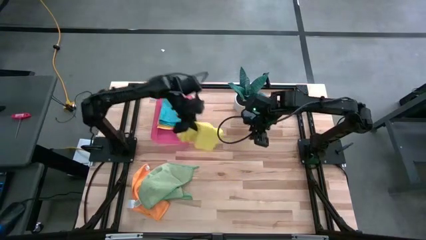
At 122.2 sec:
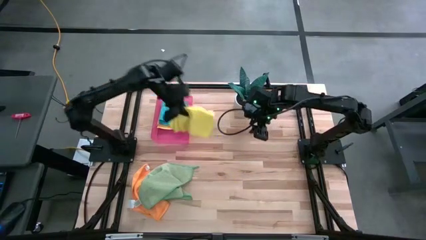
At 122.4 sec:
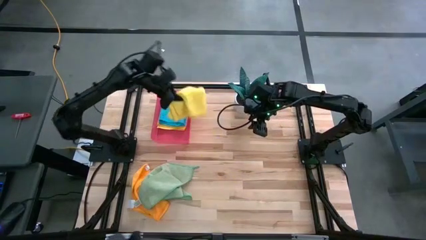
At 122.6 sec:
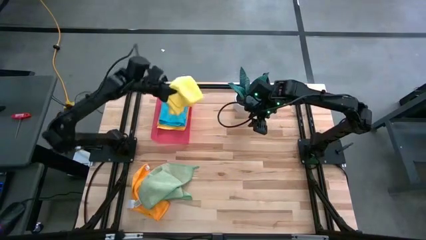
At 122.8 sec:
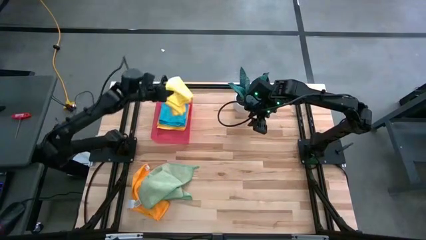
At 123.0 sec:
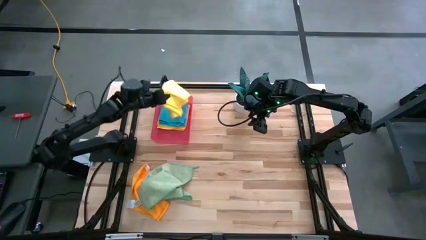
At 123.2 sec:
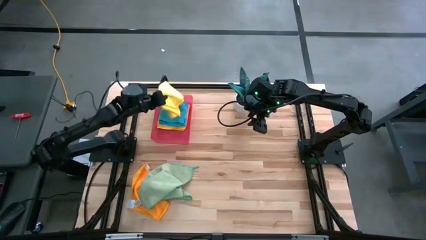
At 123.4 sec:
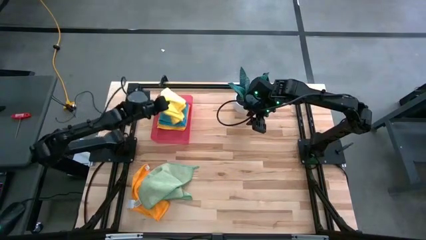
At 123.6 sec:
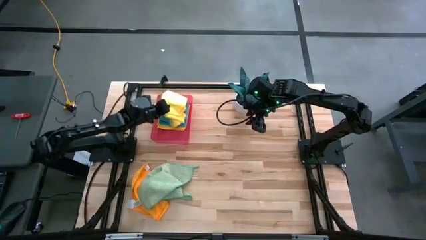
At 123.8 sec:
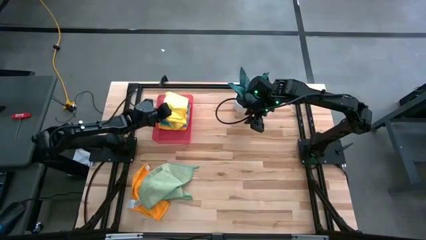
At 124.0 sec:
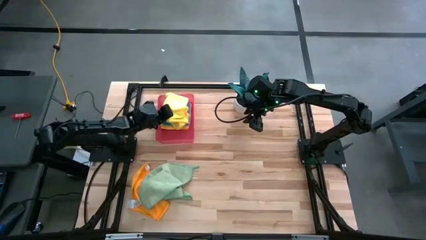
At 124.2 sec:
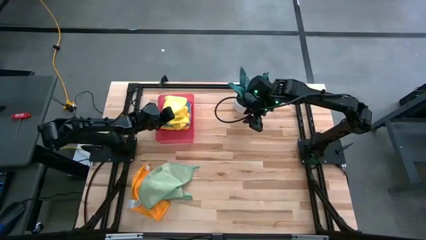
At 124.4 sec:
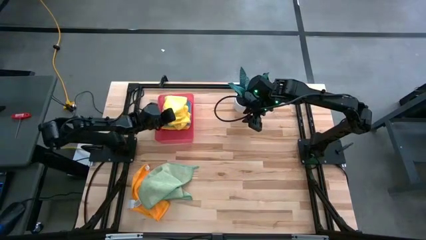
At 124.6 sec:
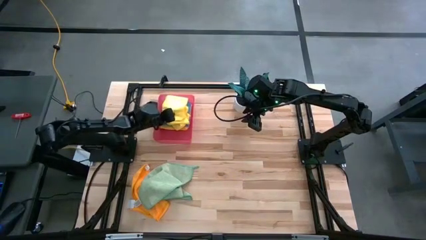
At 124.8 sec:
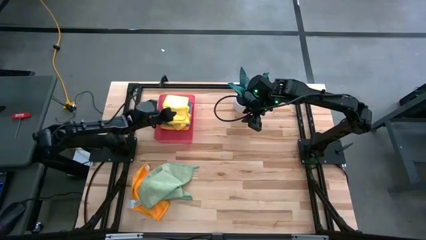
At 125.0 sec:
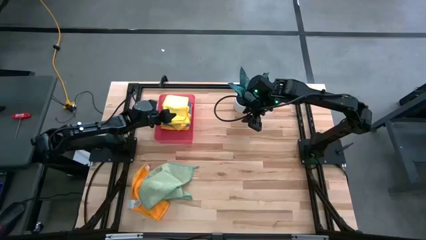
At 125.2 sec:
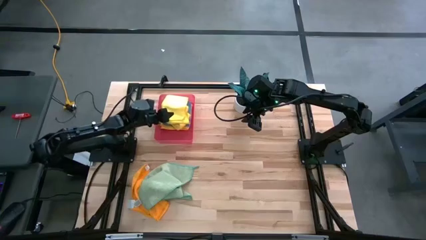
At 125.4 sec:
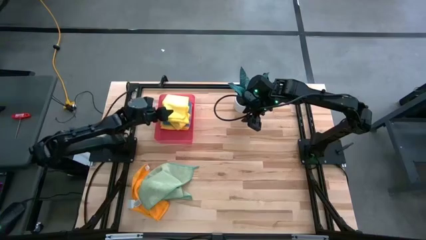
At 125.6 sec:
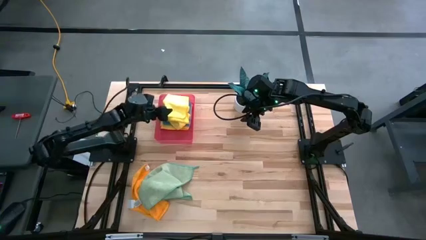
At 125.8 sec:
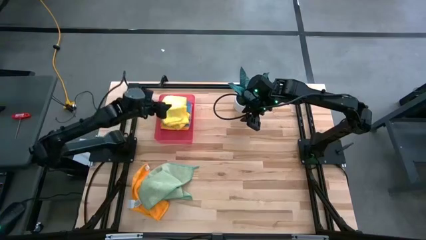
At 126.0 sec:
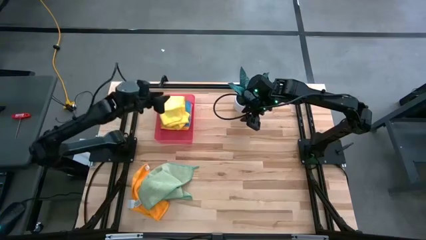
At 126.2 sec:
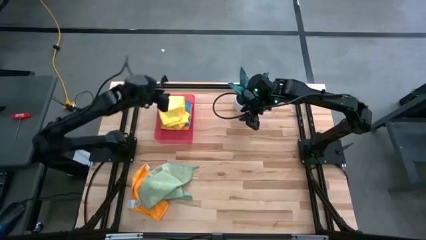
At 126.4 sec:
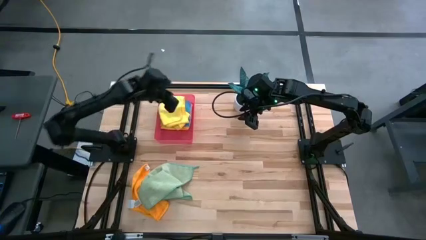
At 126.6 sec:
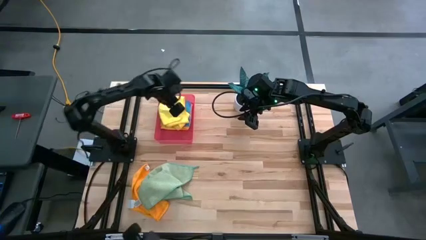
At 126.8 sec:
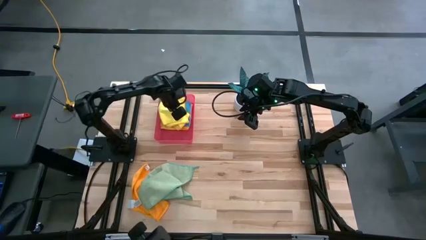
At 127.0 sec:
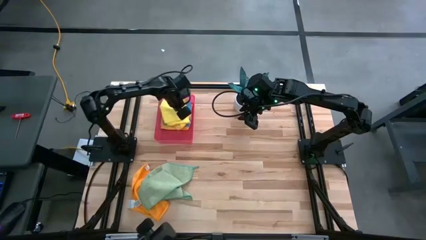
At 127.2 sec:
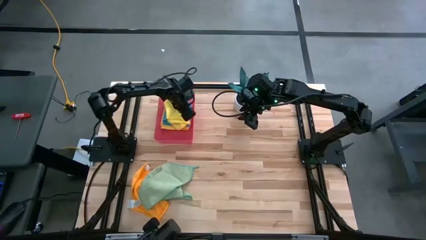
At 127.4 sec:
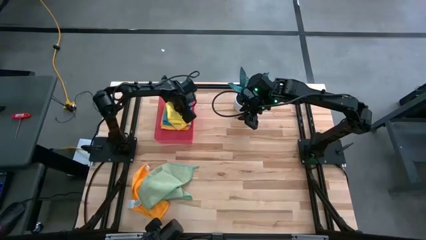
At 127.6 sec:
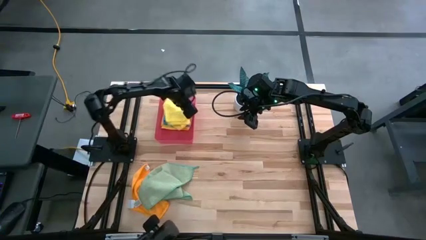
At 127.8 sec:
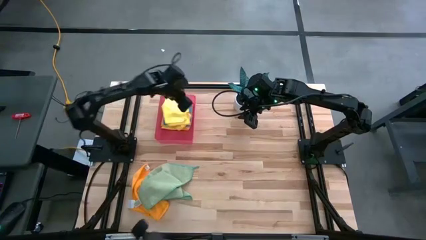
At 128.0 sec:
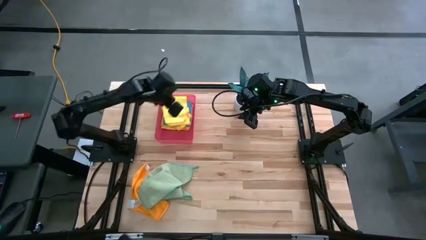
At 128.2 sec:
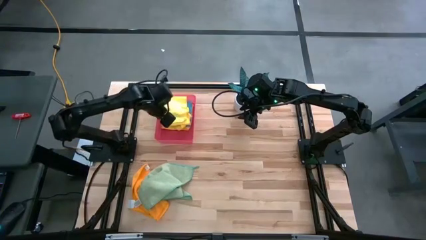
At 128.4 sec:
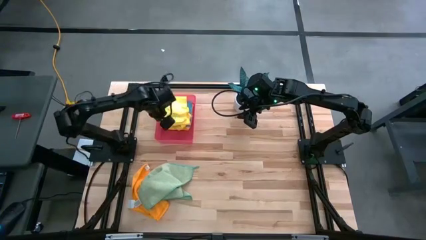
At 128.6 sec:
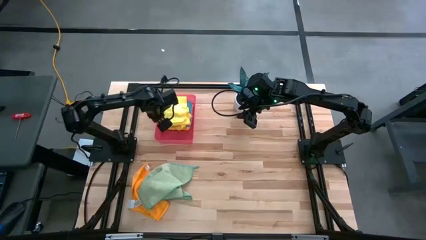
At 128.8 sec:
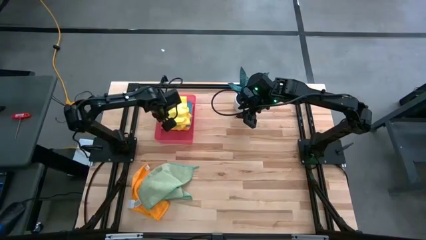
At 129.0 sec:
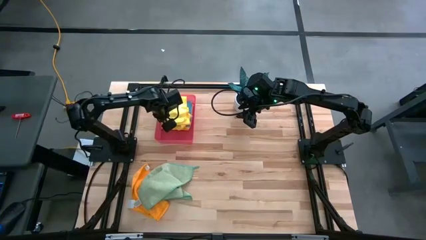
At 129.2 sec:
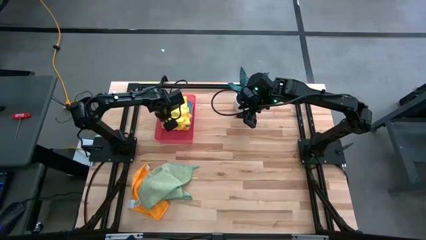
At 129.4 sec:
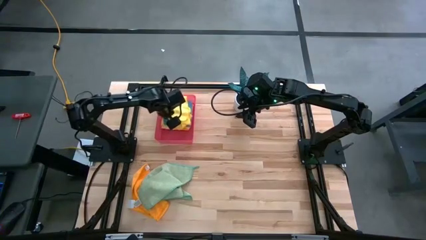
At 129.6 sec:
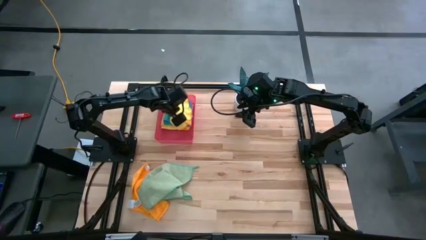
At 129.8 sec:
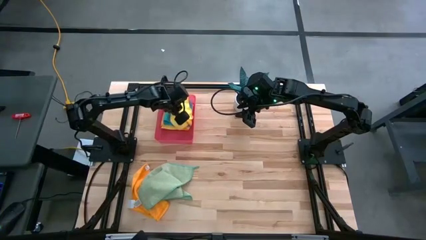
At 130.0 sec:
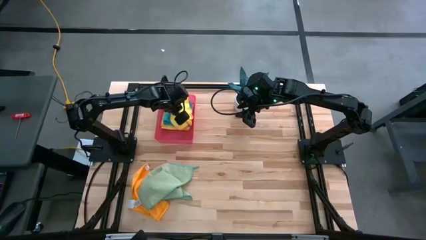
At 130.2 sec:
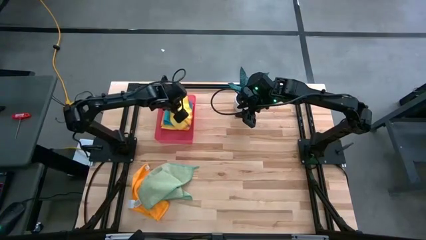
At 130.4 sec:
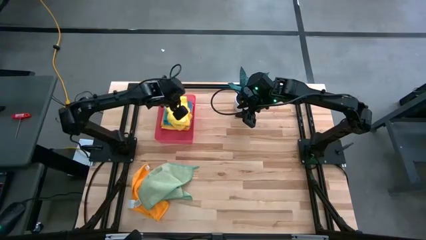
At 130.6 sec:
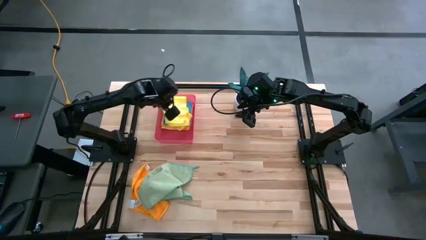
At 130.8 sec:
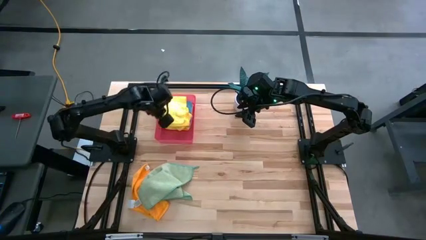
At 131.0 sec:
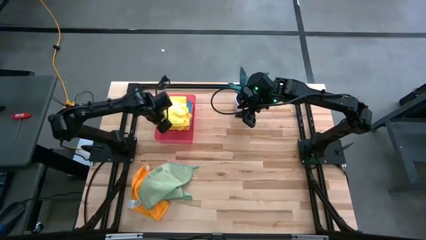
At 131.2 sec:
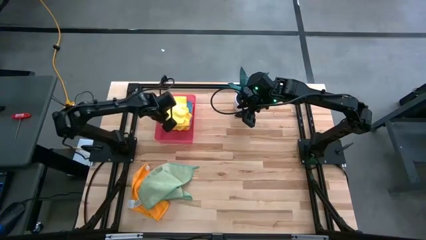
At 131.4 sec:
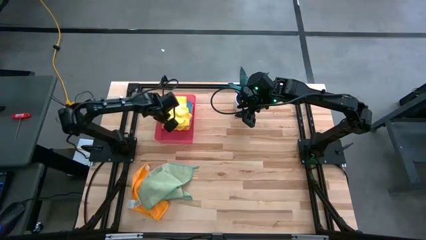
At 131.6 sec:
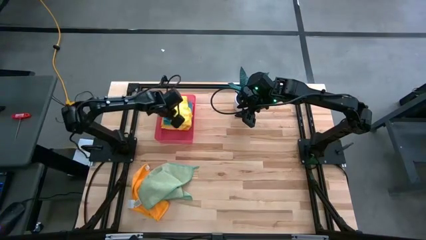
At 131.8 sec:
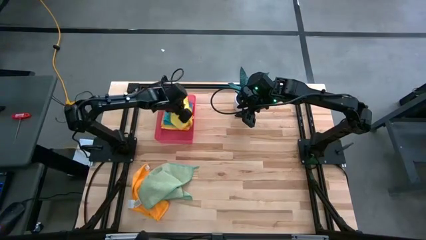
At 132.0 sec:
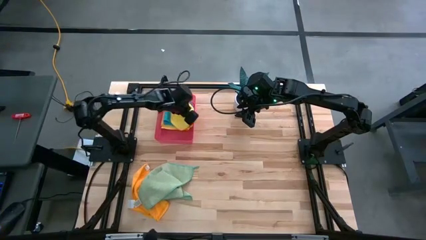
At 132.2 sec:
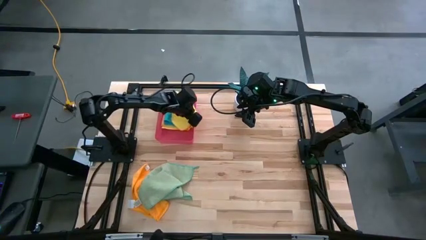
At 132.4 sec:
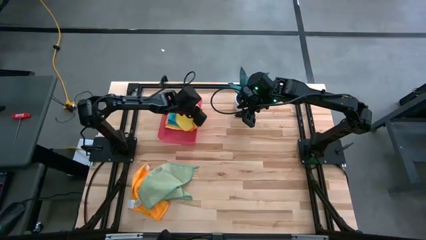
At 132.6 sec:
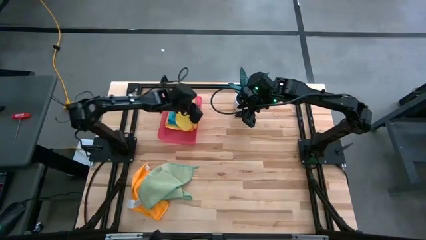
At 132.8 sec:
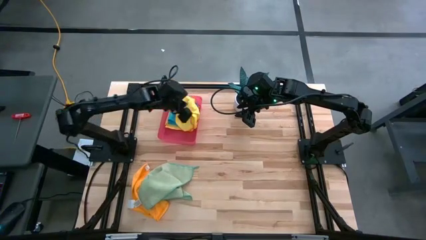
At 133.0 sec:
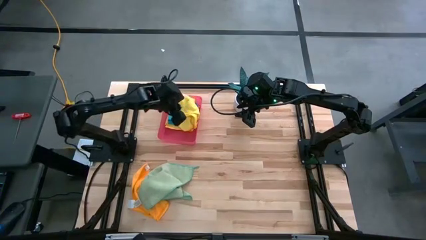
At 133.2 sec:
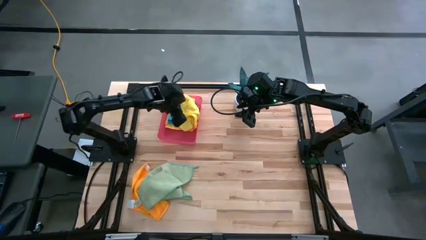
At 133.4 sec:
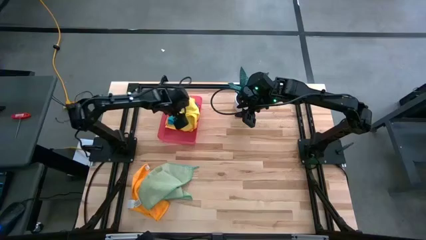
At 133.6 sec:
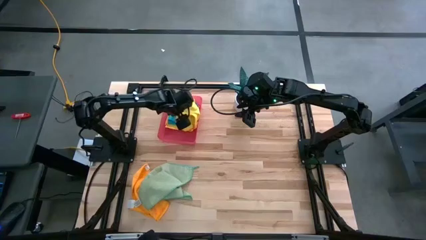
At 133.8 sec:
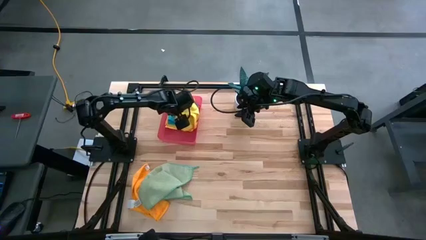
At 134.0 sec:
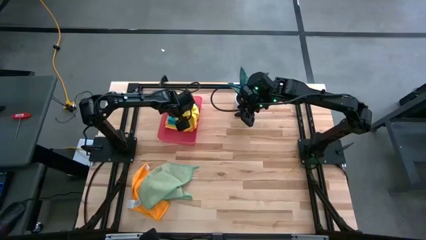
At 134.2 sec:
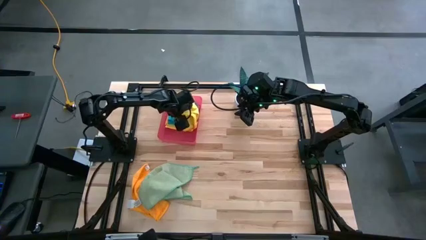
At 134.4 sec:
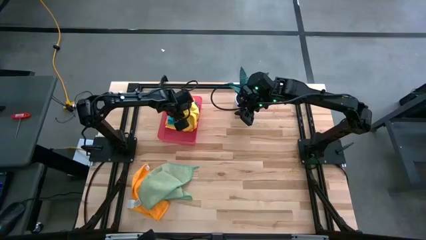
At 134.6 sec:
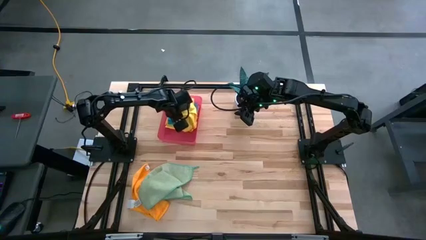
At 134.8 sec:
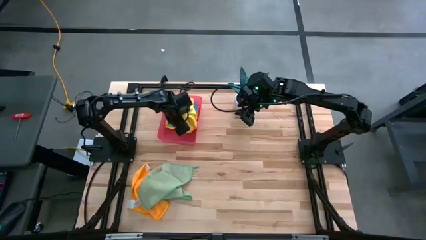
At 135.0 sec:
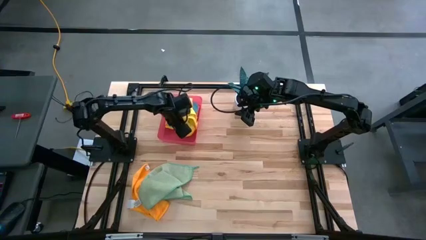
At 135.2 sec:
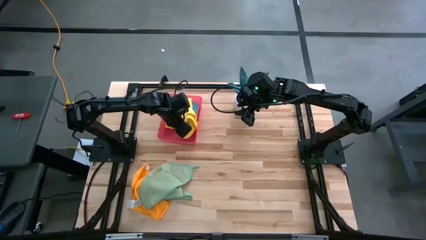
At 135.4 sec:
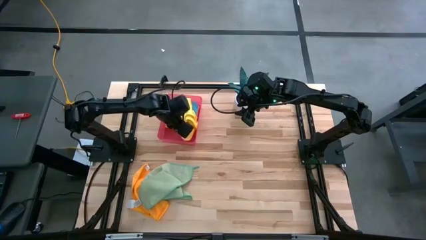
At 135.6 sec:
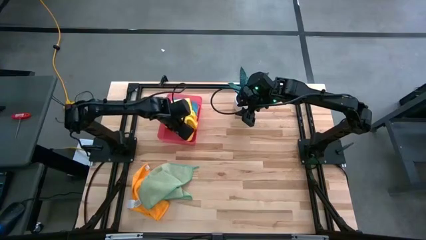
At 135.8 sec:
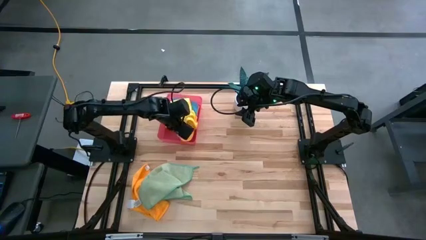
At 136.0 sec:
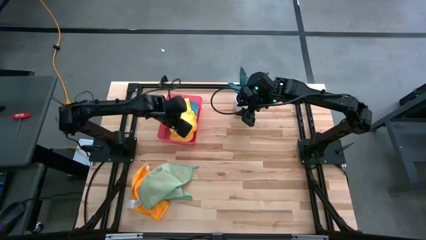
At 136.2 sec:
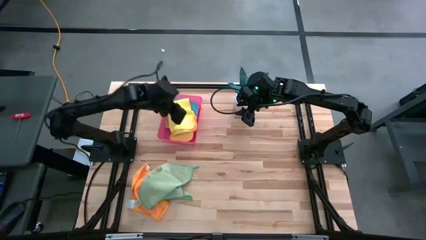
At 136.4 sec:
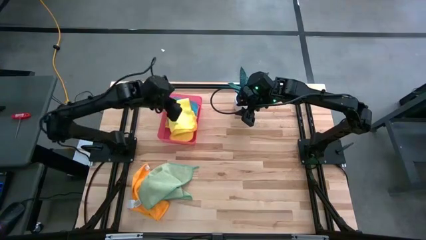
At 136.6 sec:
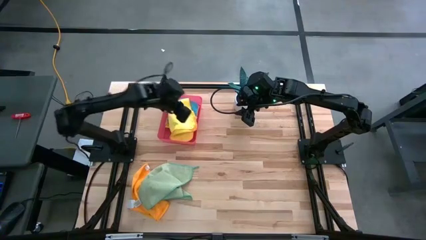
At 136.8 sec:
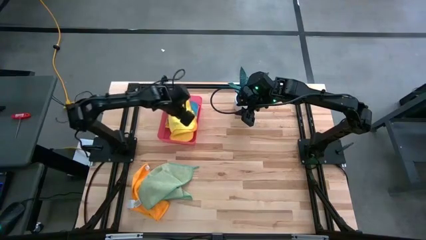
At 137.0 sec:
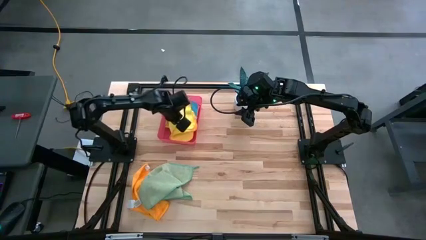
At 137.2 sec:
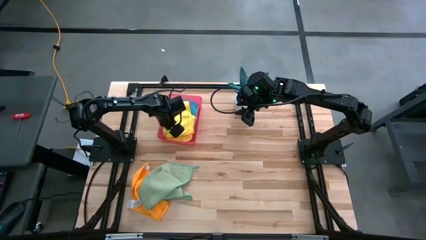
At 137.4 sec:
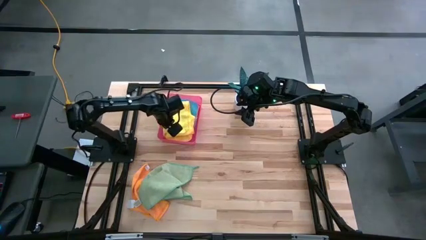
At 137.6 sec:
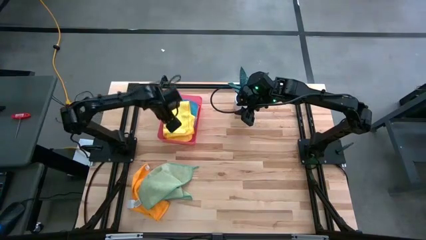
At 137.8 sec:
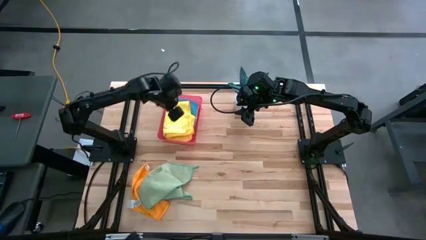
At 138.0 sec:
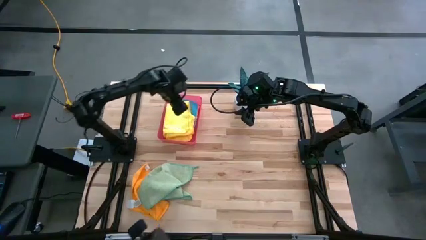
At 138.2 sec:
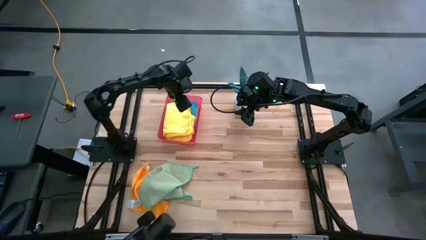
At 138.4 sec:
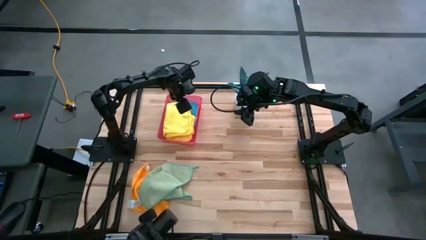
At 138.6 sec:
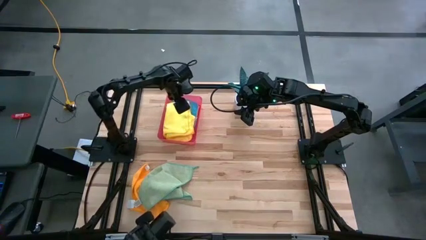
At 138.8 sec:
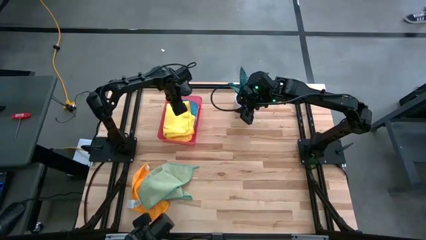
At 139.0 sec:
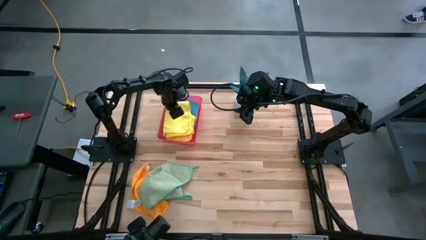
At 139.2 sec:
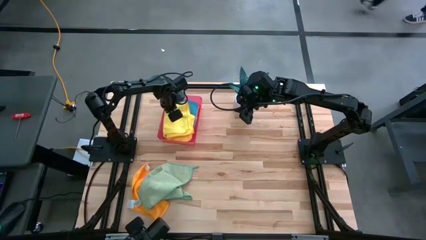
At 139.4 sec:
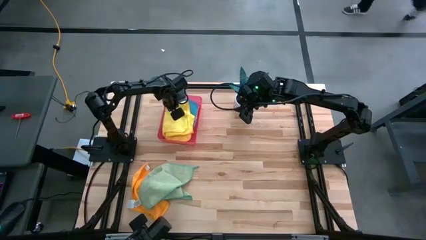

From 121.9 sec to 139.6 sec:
Task: Fold microfiber towels
Put the folded yellow microfiber towel into the pink bin
